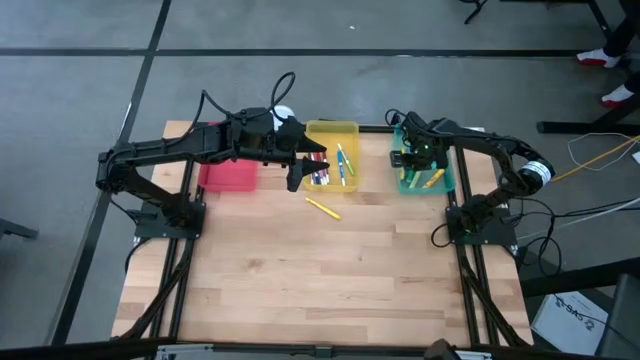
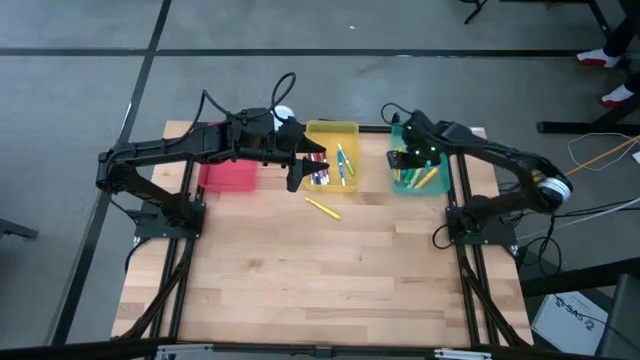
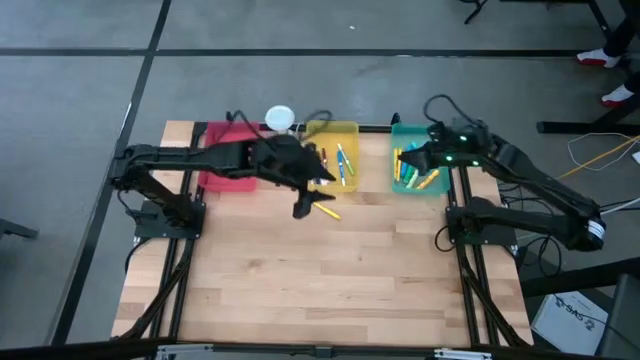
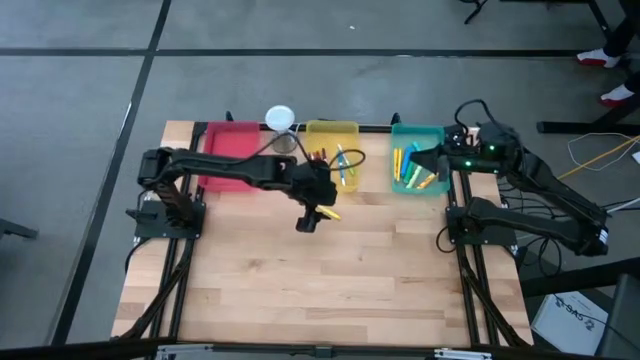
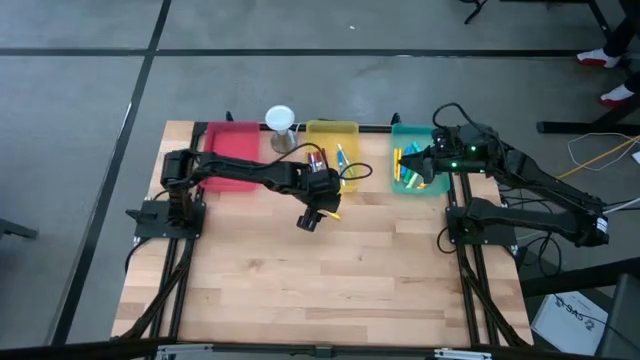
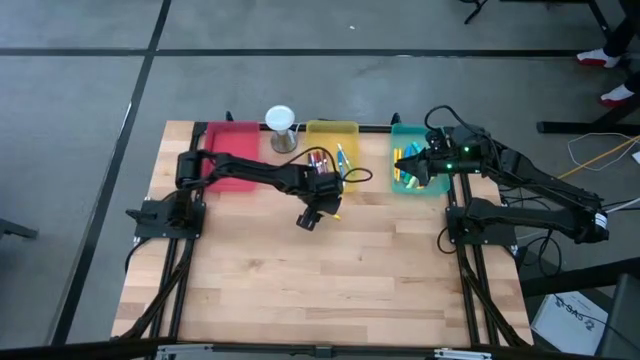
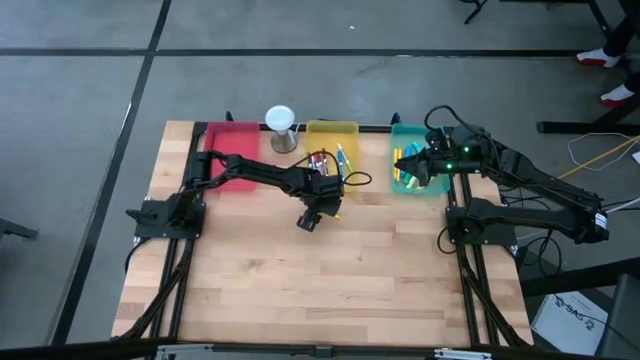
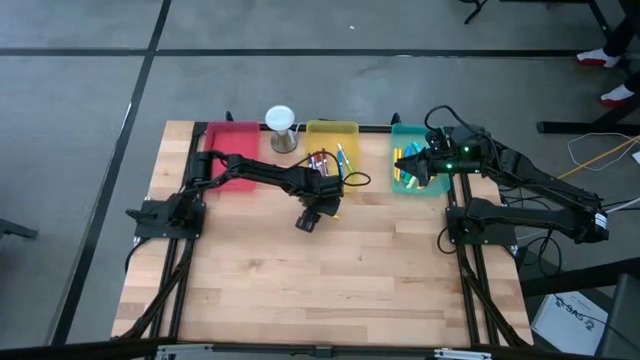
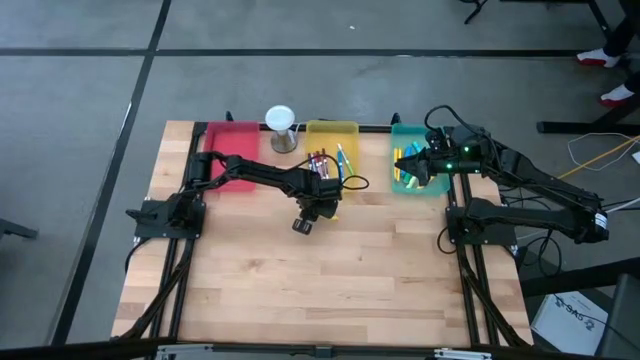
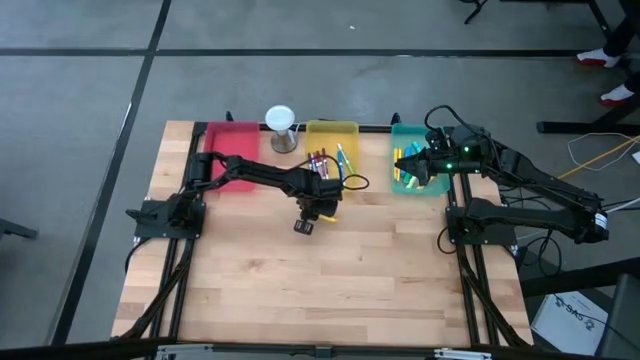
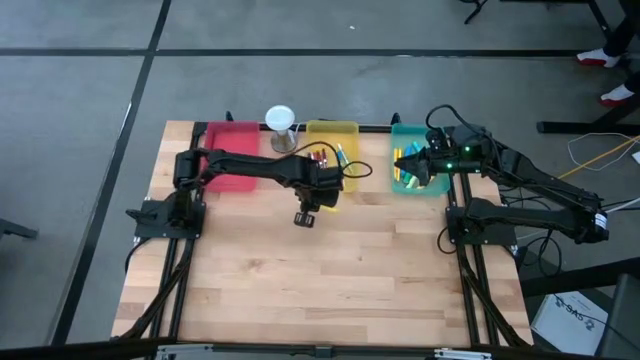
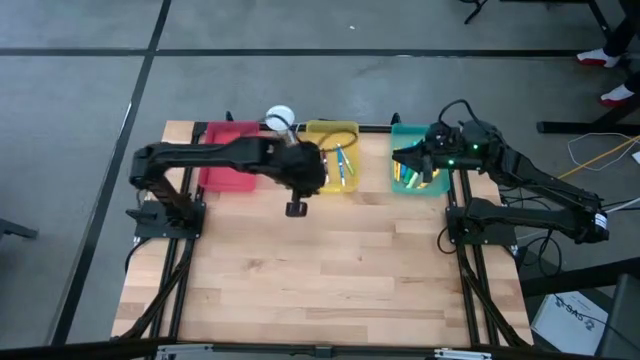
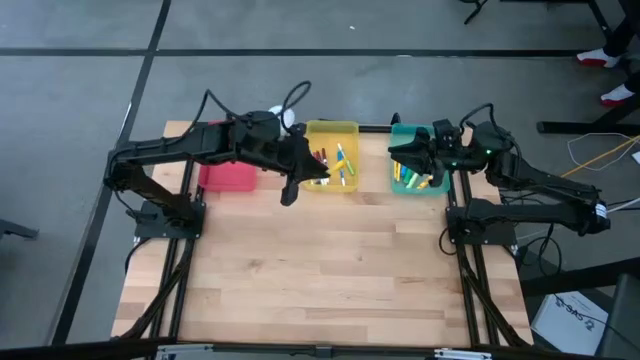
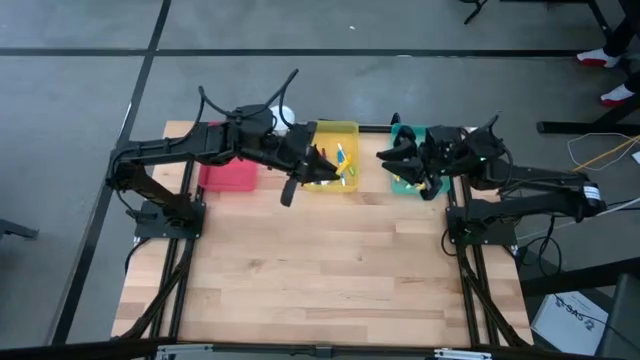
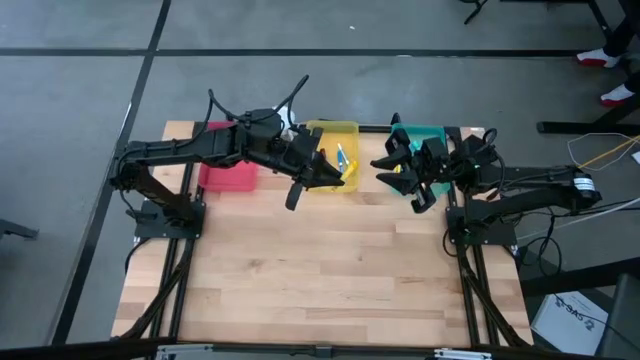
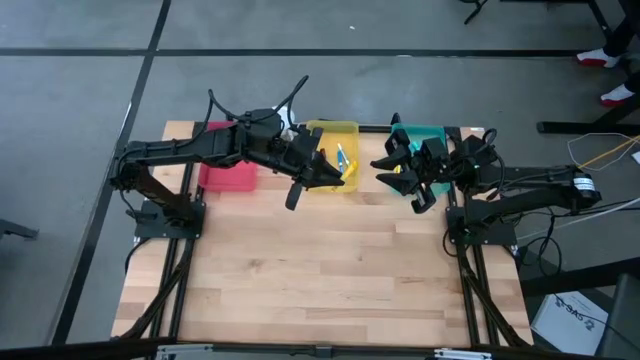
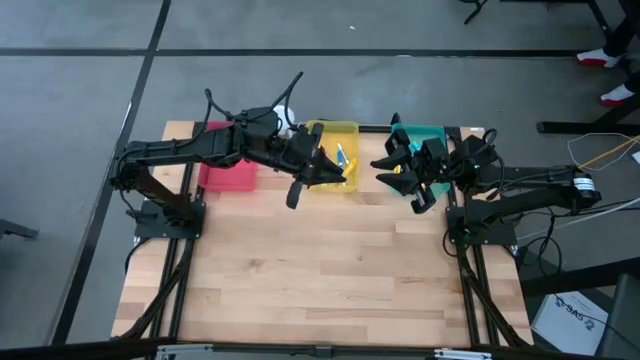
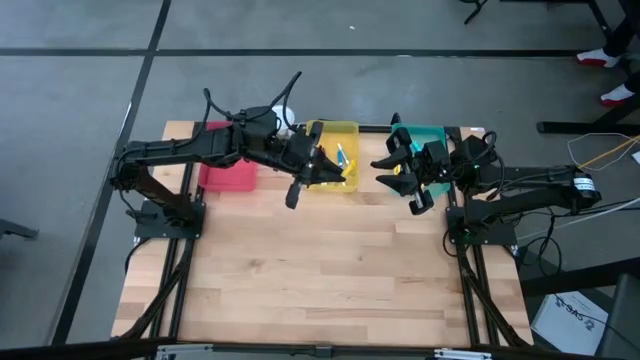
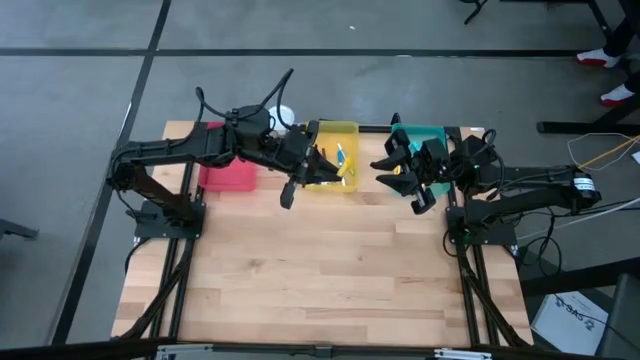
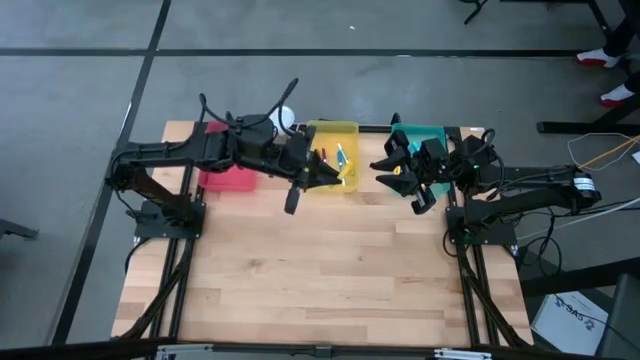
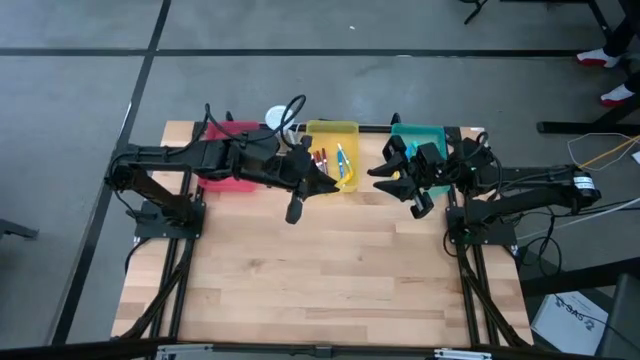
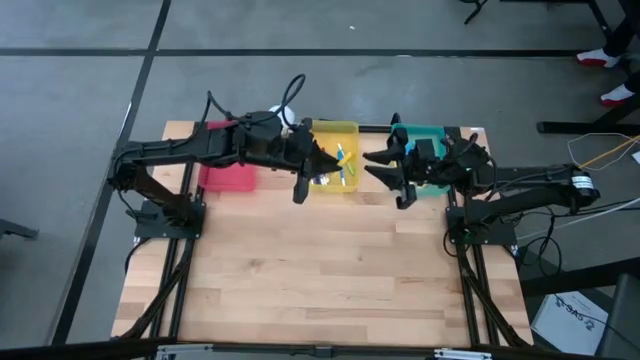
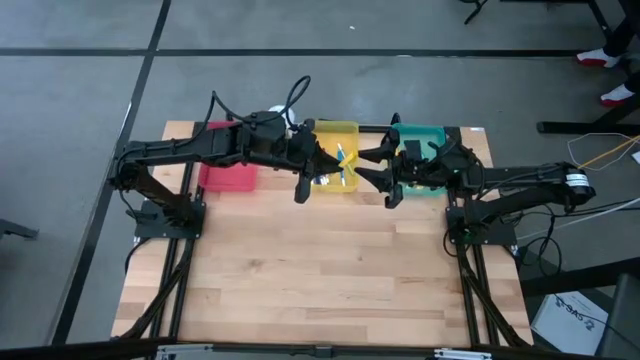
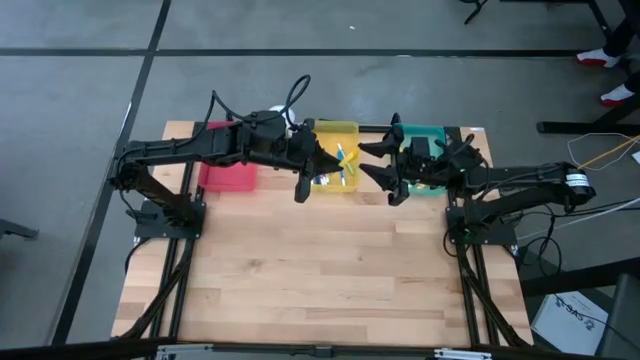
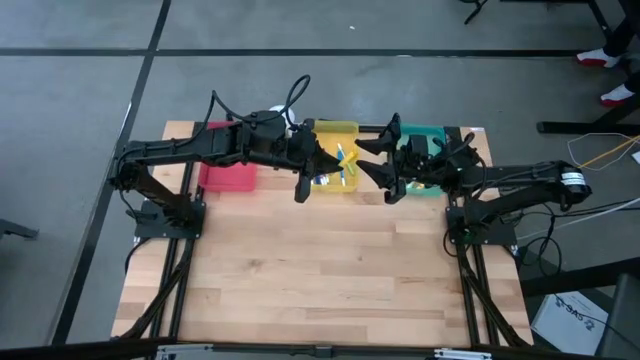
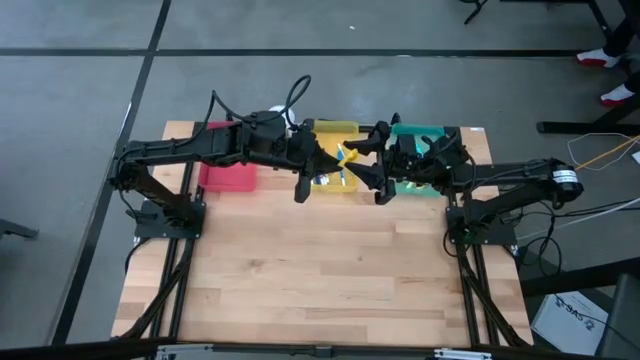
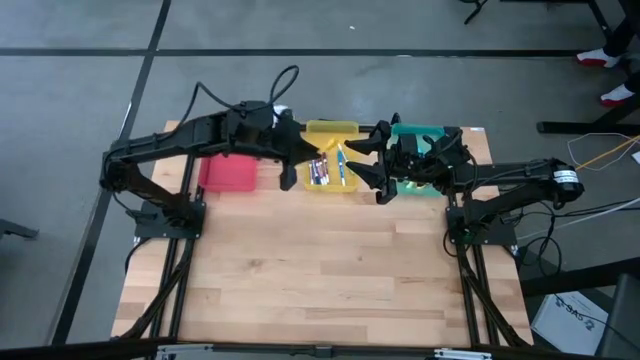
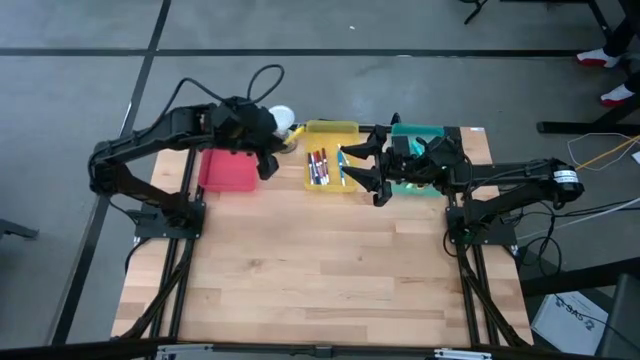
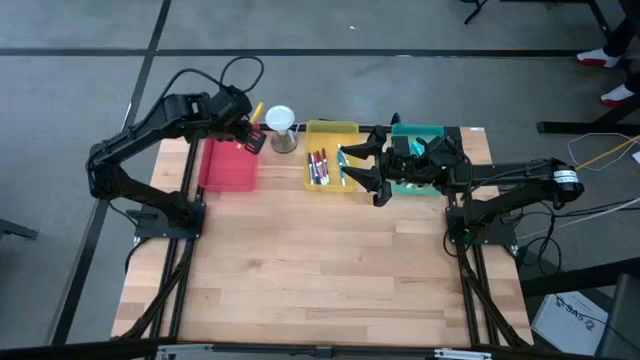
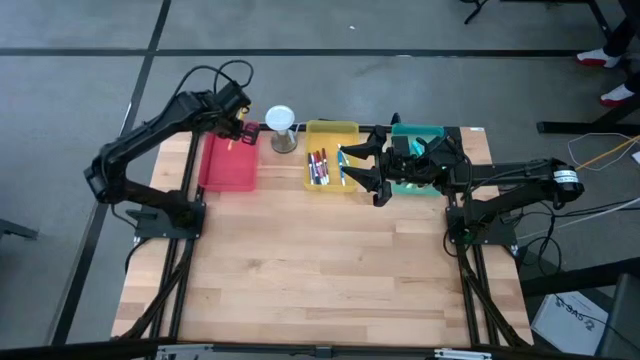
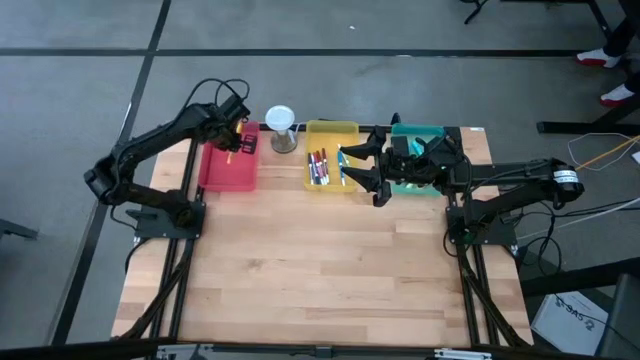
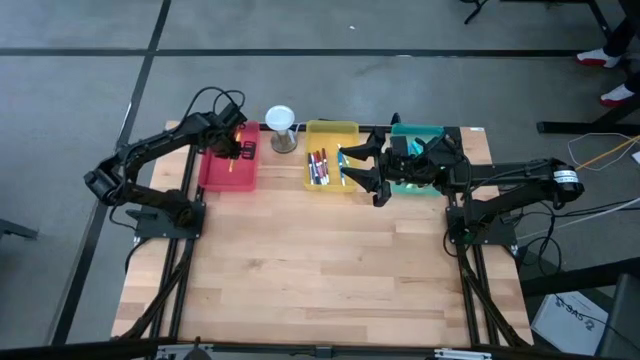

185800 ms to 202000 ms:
Task: Pick & Place Markers
Put the yellow pen into the red bin

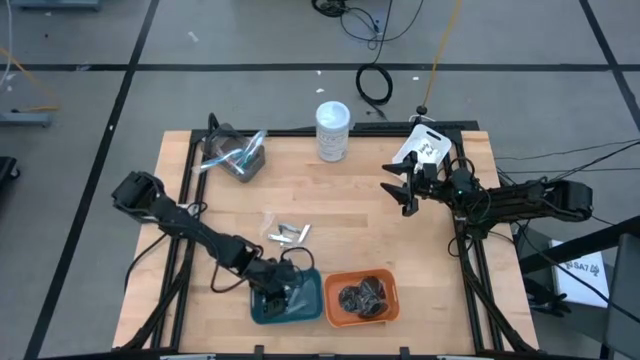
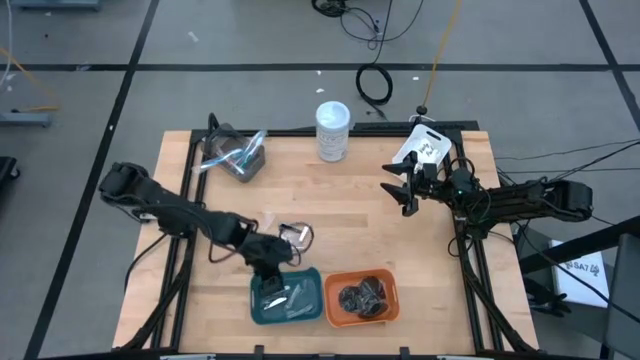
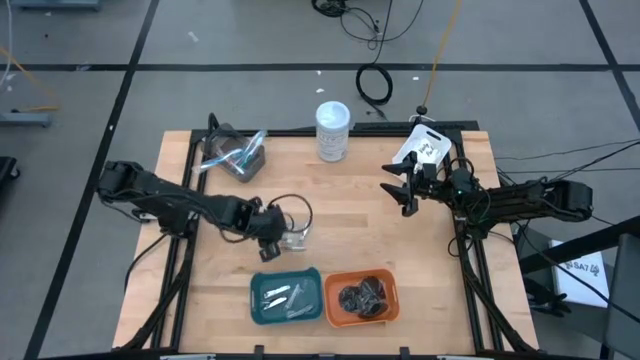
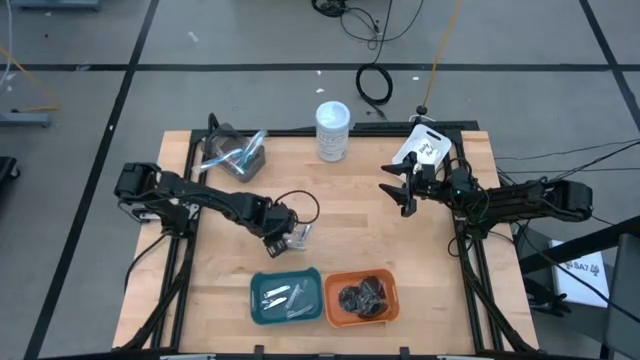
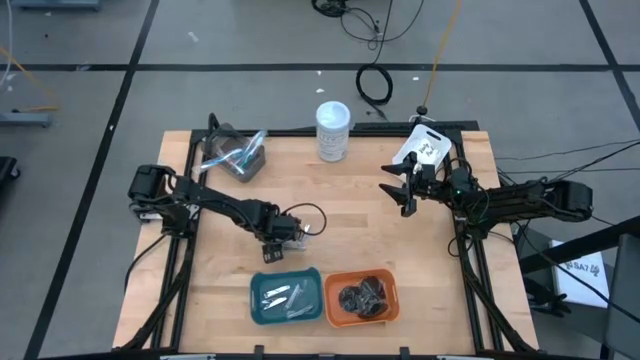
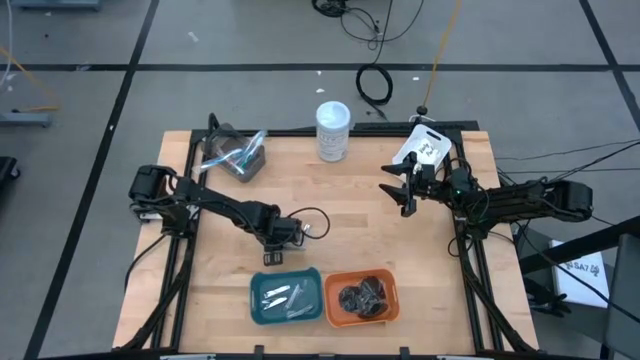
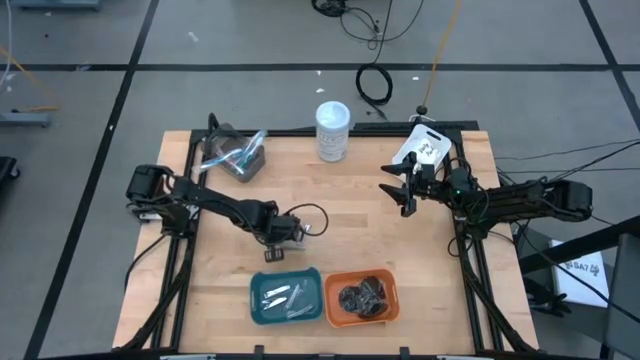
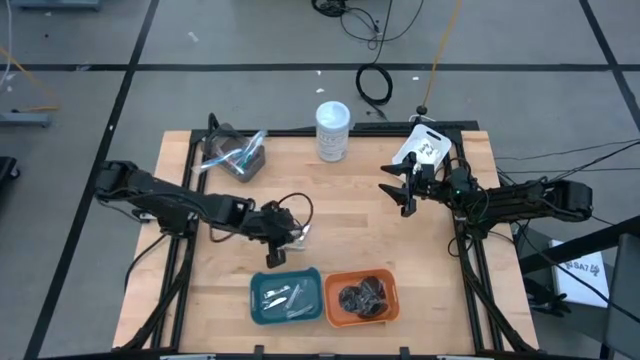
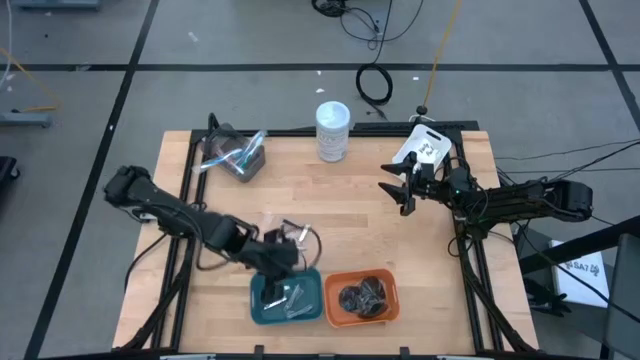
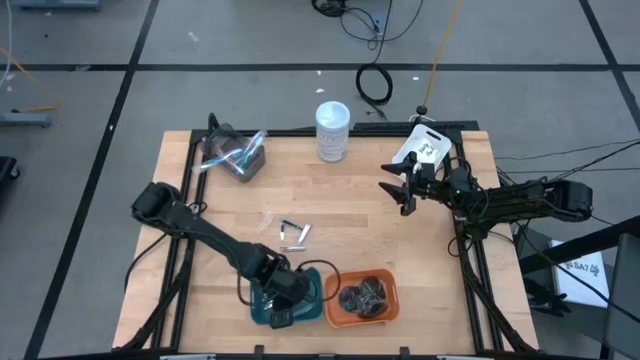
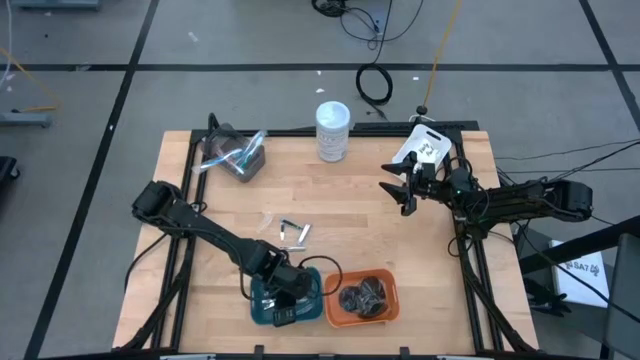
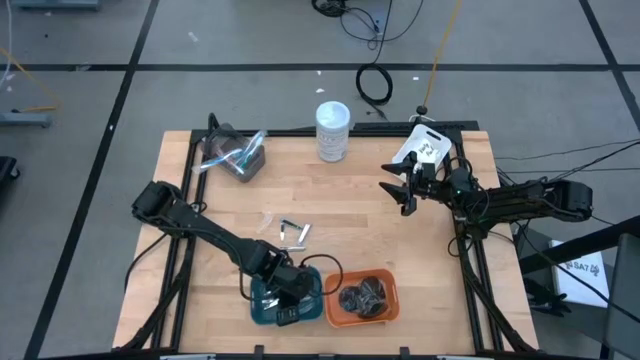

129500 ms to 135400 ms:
Task: Pick & Place Travel size toiletries
Put the silver nail cutter into the green bin
